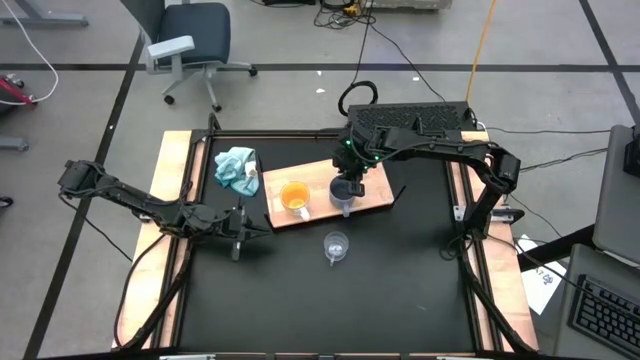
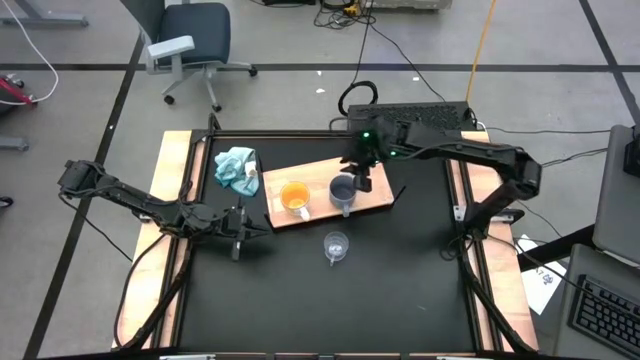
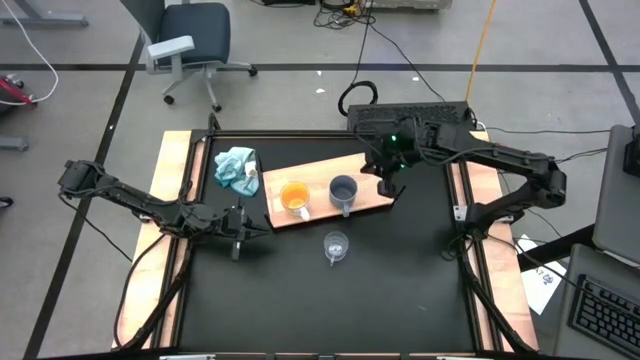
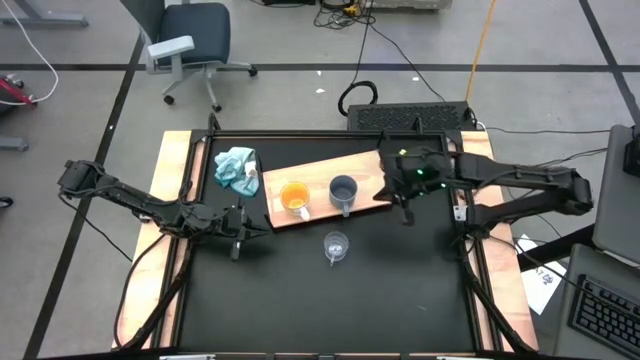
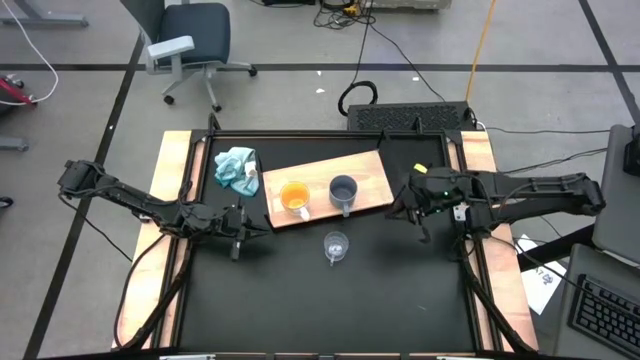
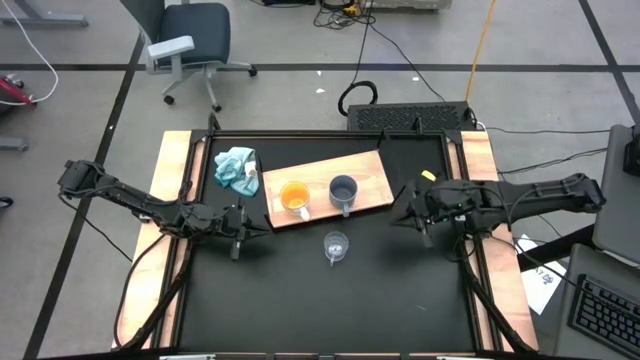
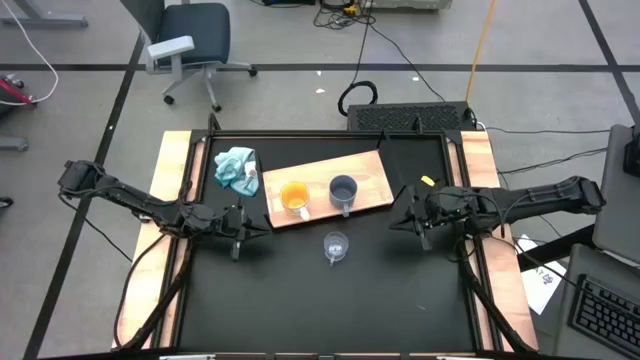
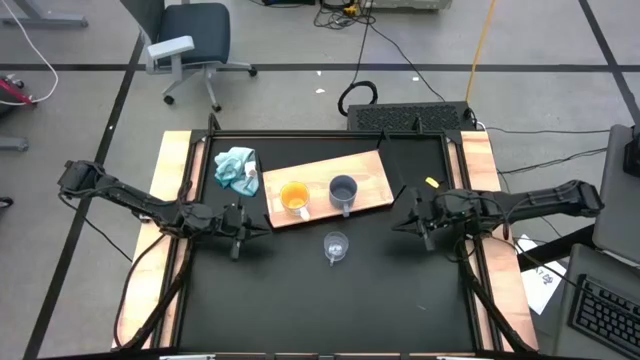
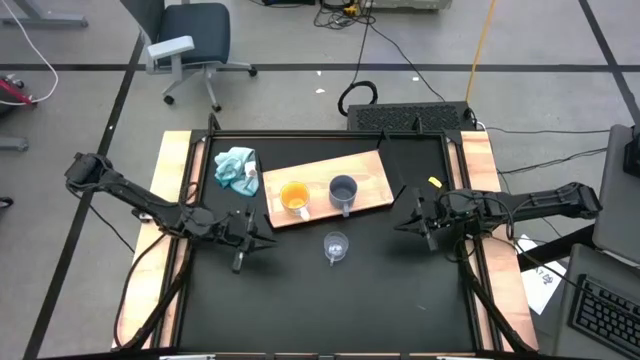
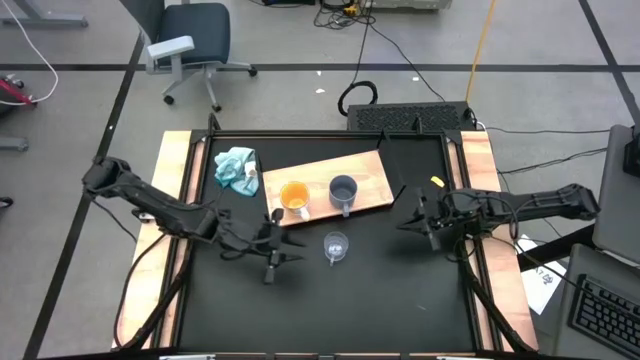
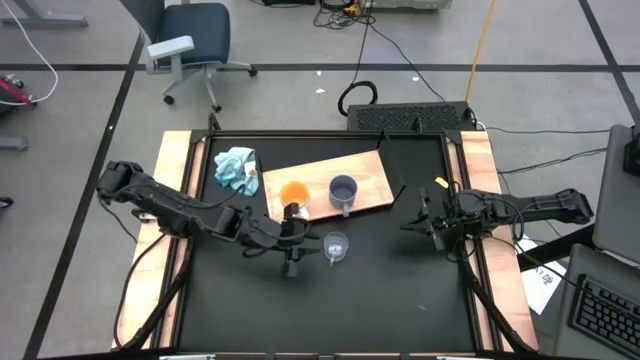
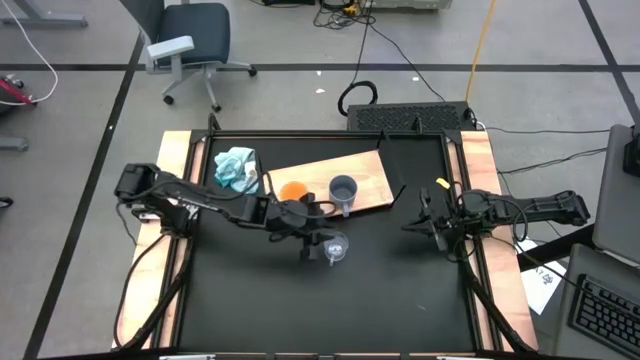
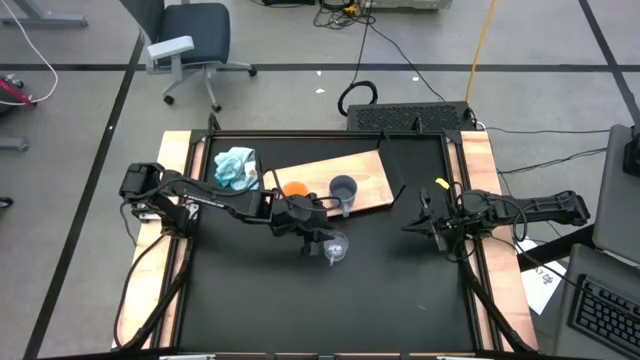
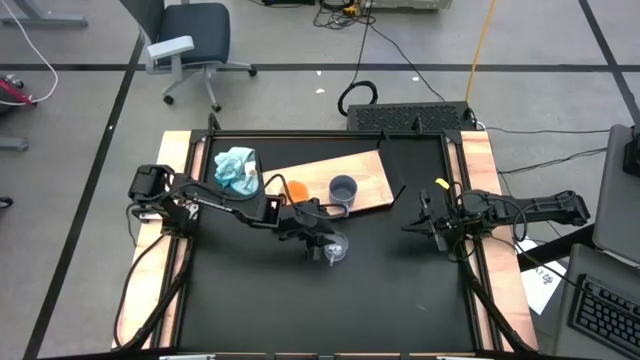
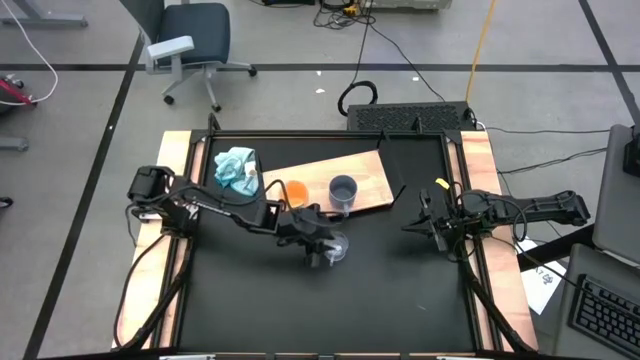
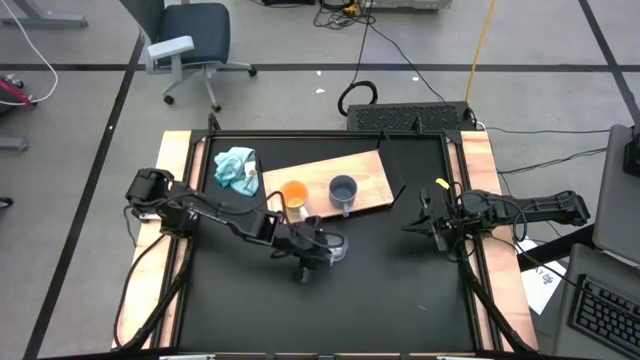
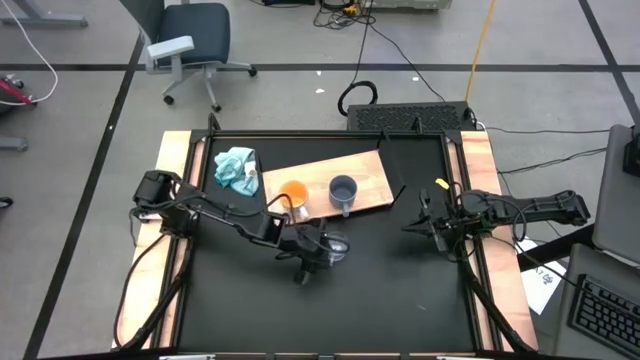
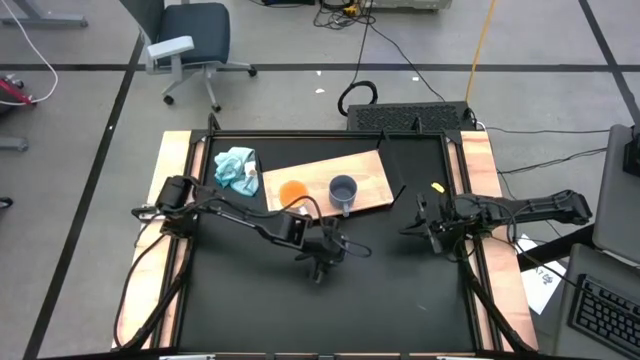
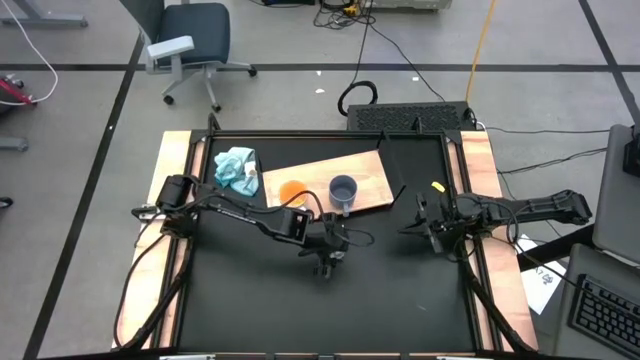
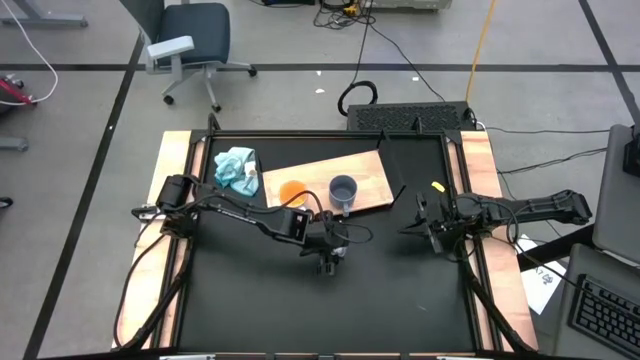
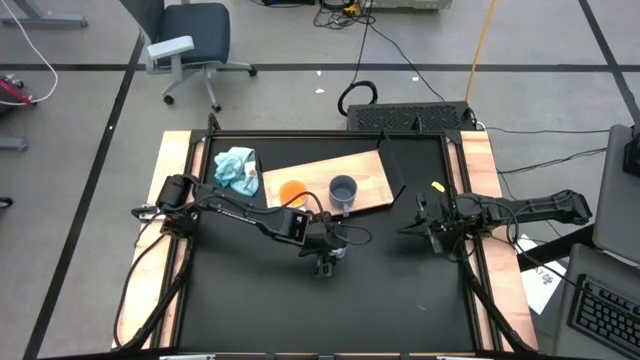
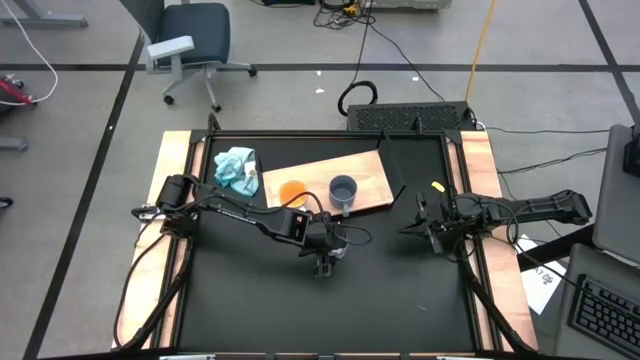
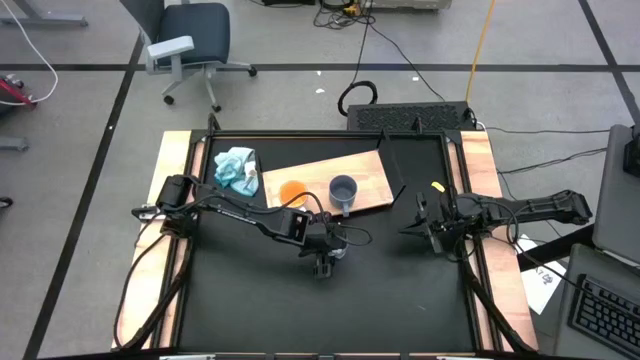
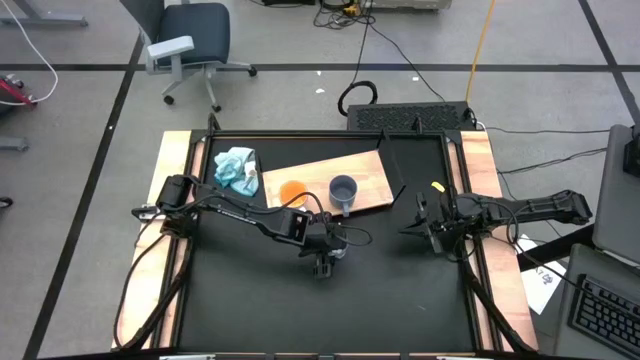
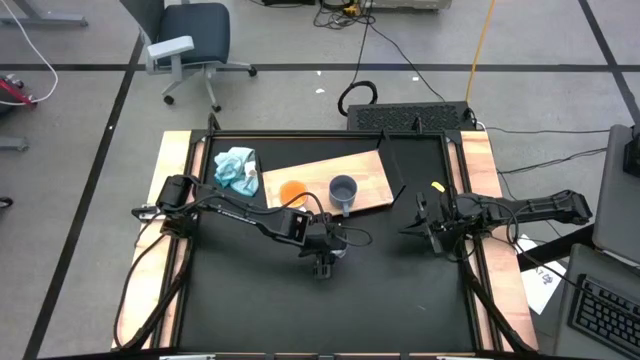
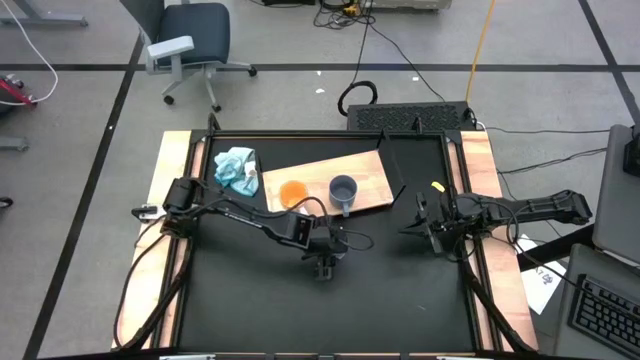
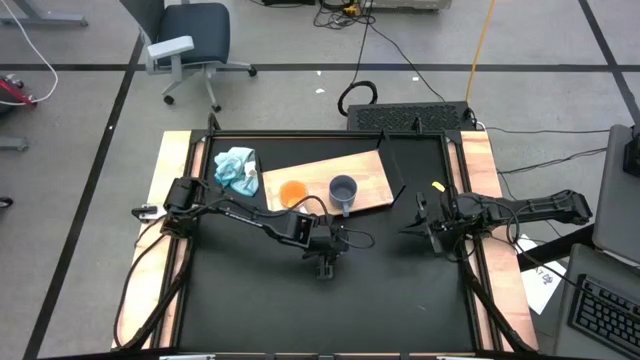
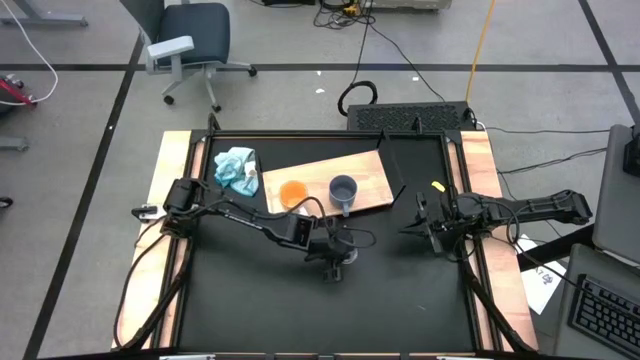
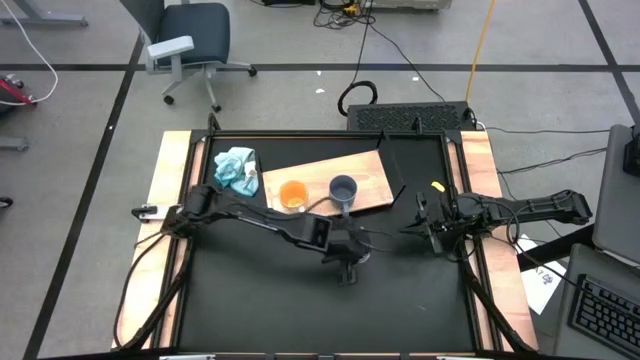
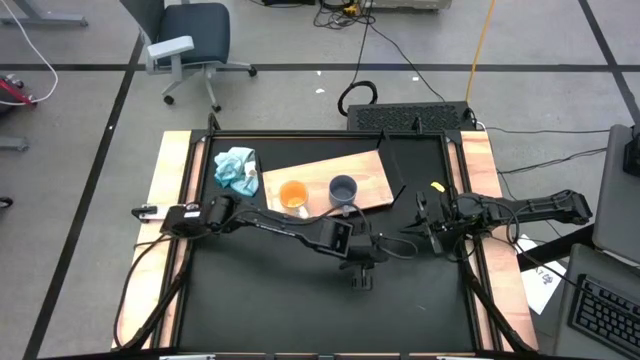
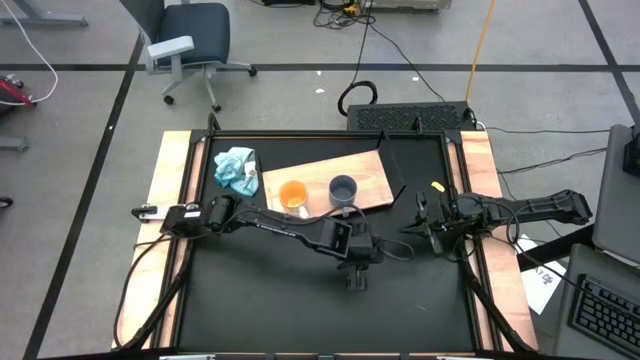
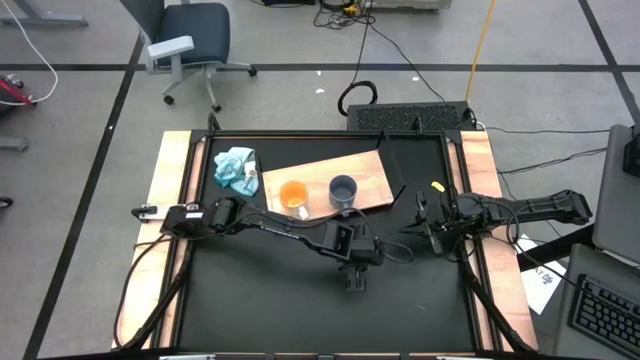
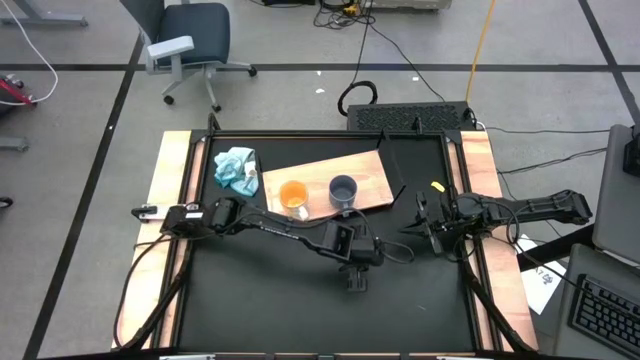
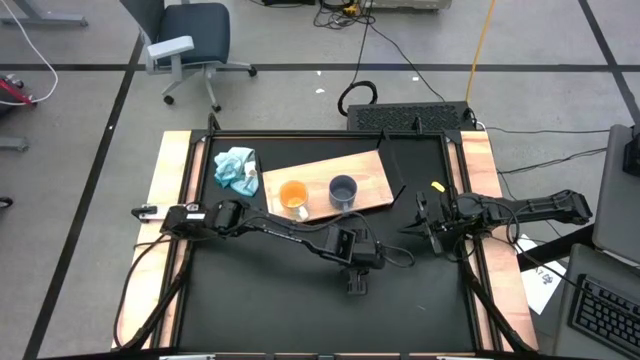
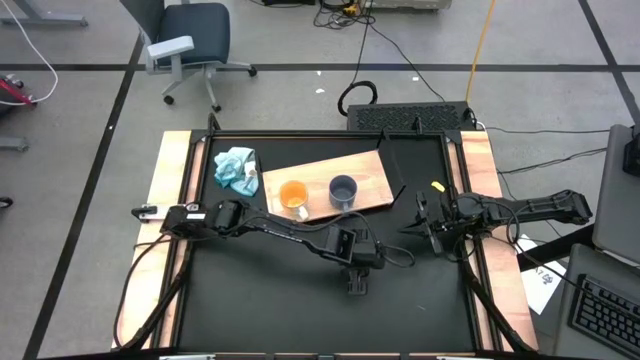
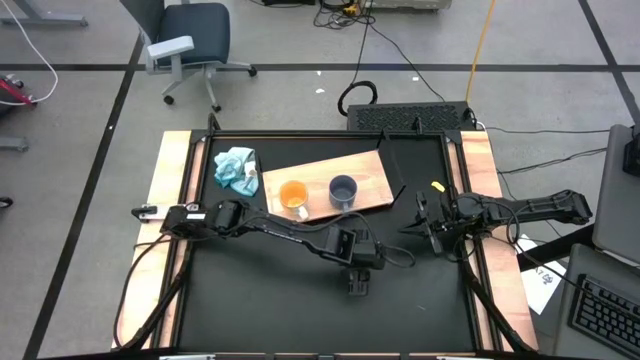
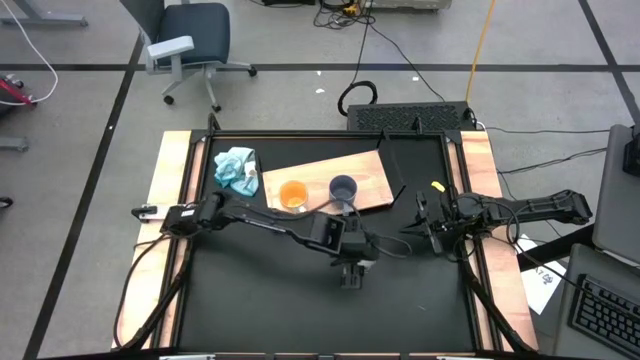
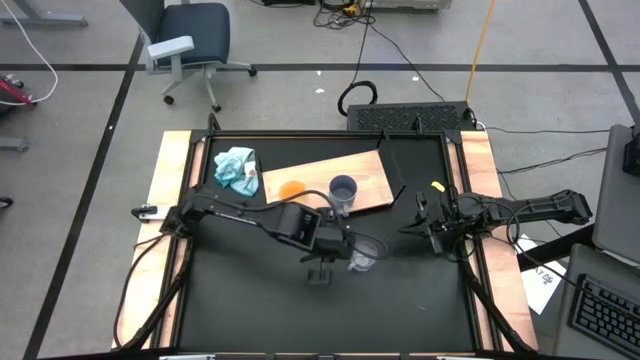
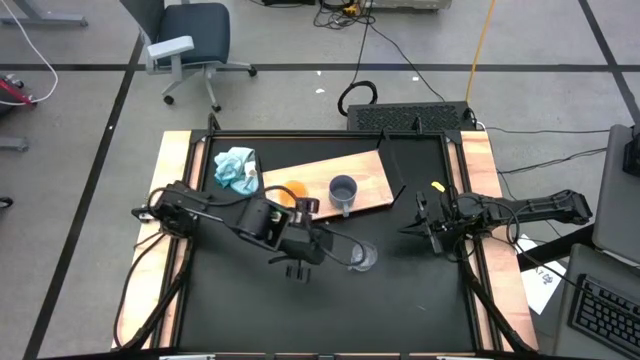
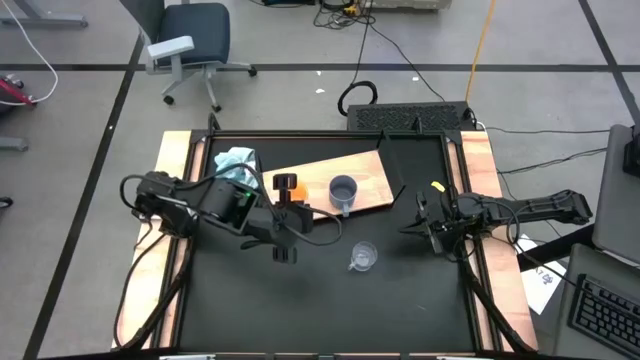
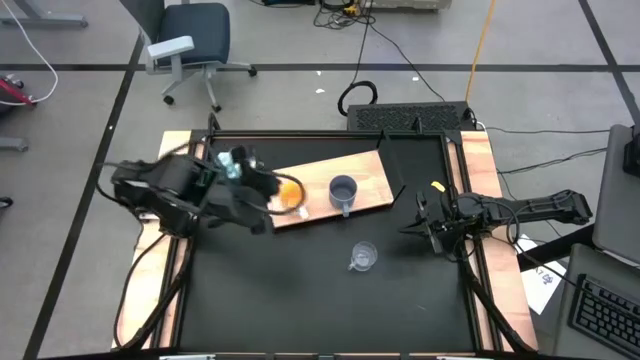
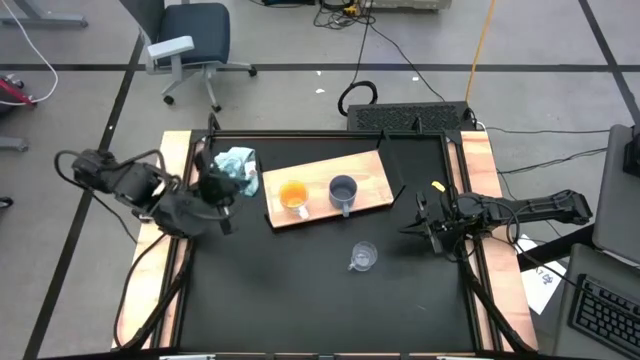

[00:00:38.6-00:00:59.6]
Task: Stack small to large cups/mugs on shelf
Put the transparent mug on the shelf

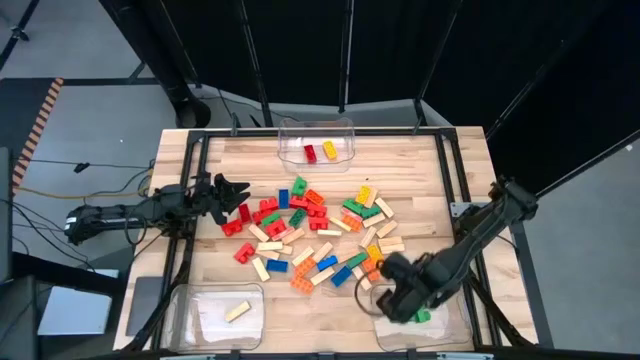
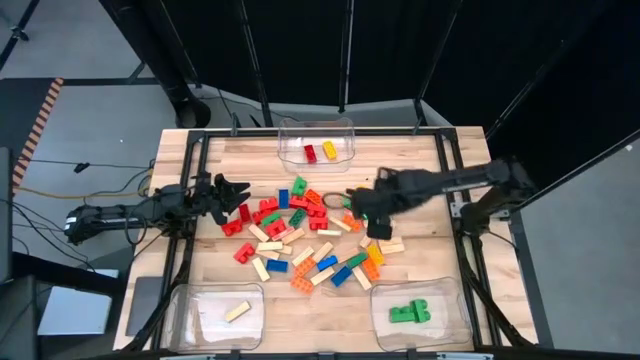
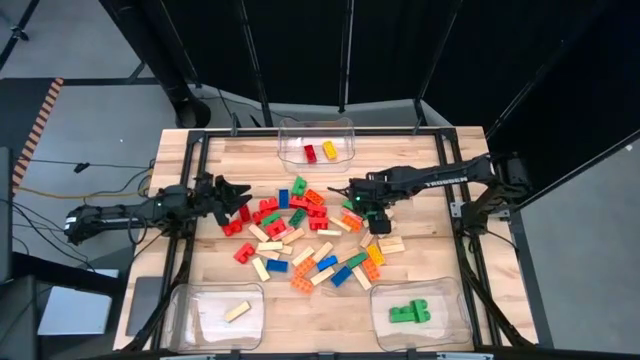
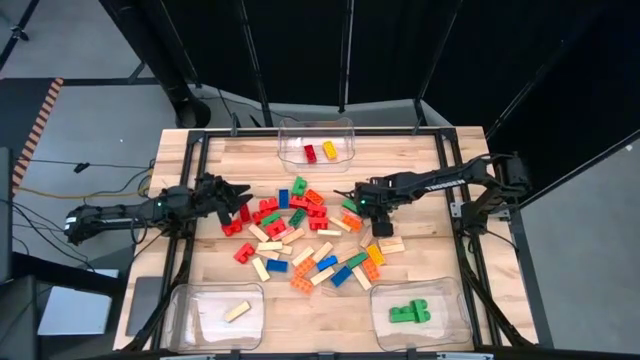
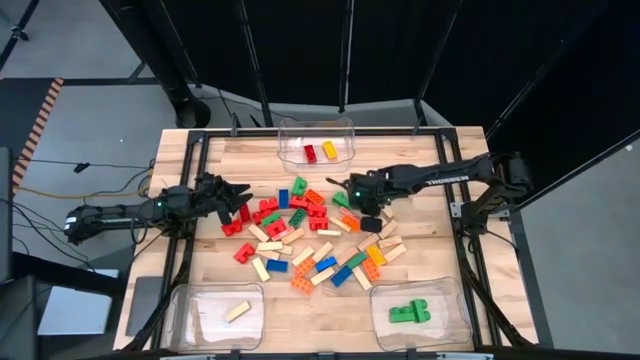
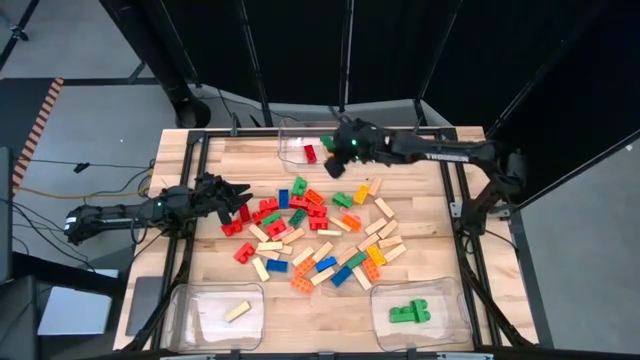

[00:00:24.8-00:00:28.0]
Task: Sort blocks by size
Put the 4-stud green game piece into the top center transparent bin
